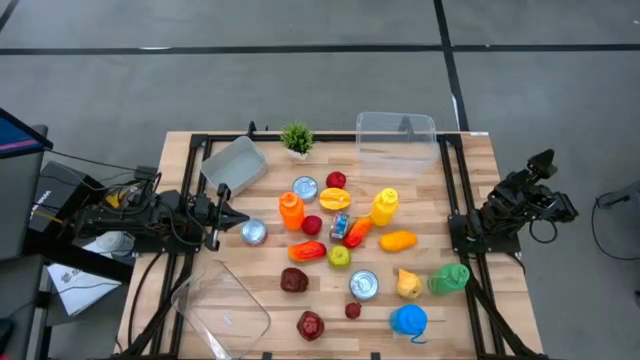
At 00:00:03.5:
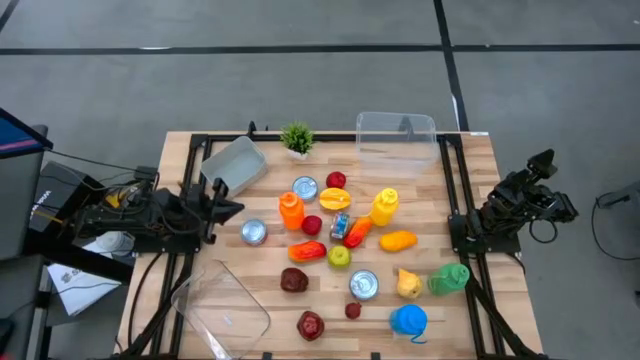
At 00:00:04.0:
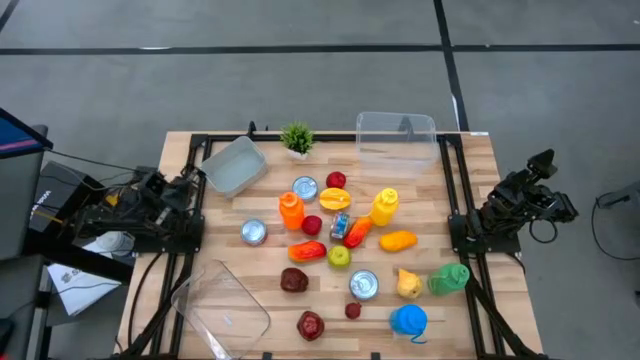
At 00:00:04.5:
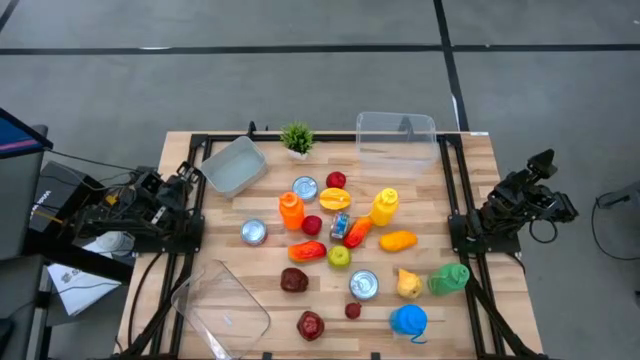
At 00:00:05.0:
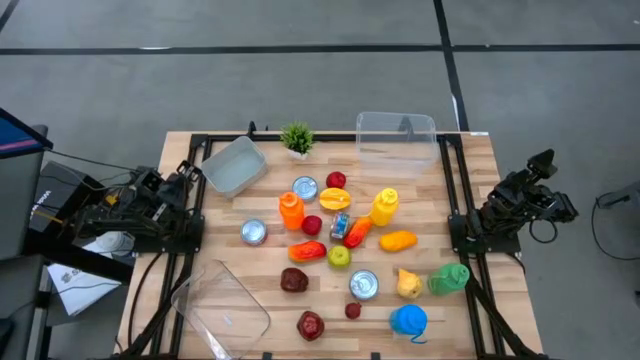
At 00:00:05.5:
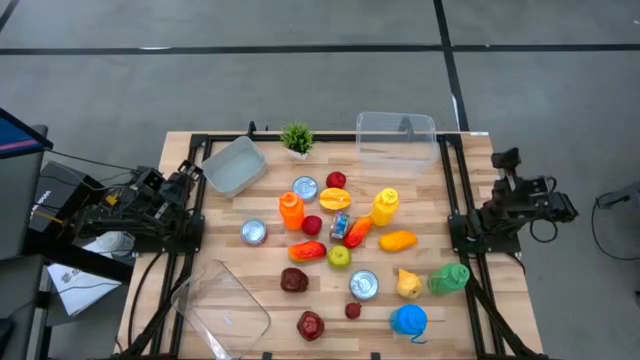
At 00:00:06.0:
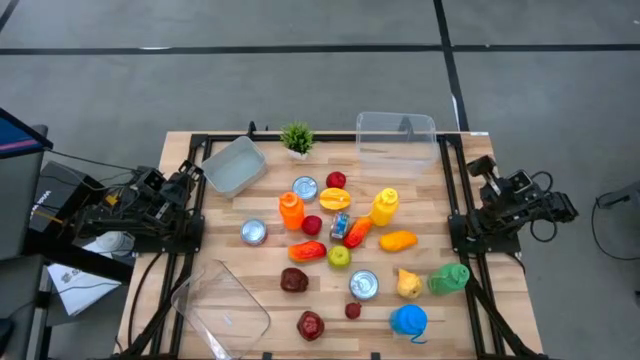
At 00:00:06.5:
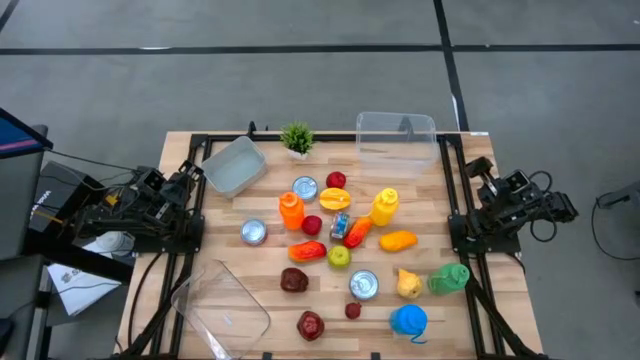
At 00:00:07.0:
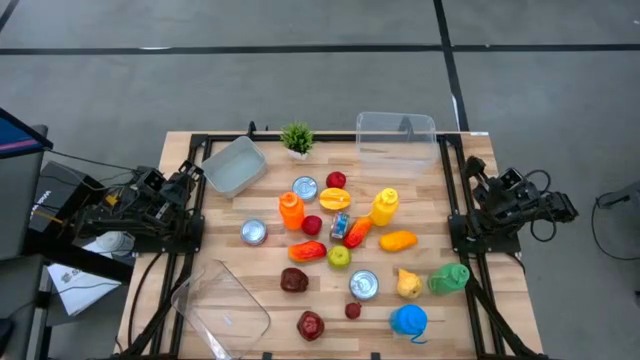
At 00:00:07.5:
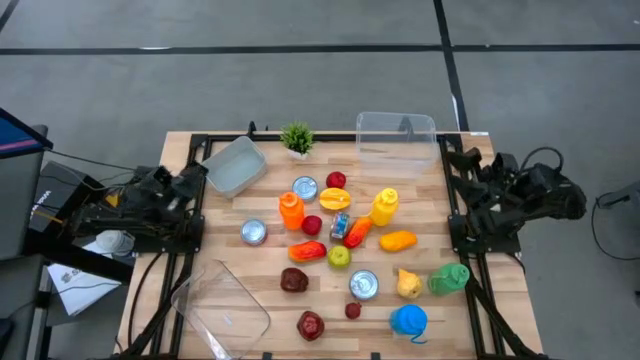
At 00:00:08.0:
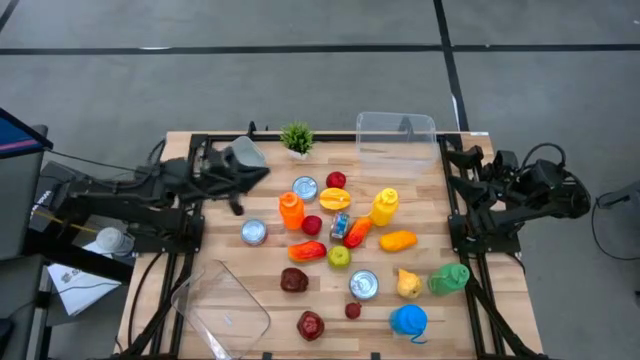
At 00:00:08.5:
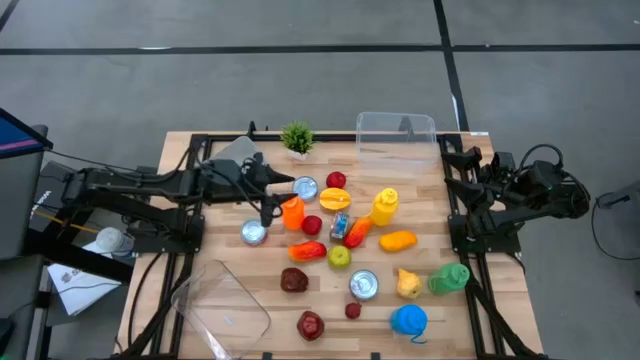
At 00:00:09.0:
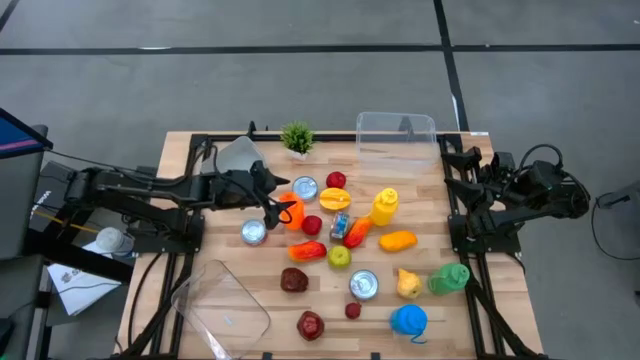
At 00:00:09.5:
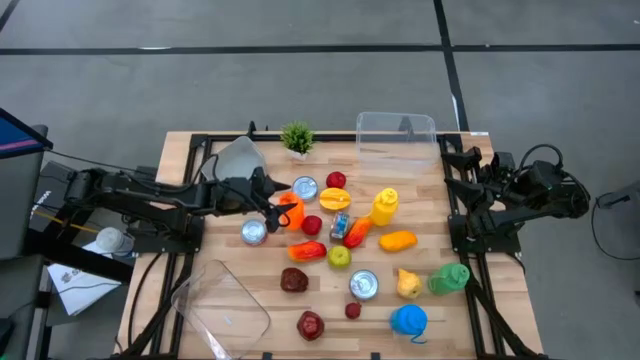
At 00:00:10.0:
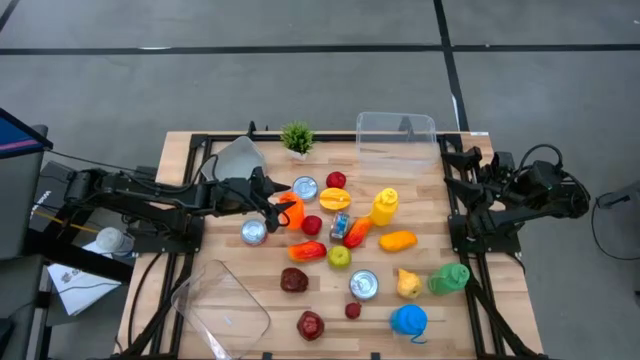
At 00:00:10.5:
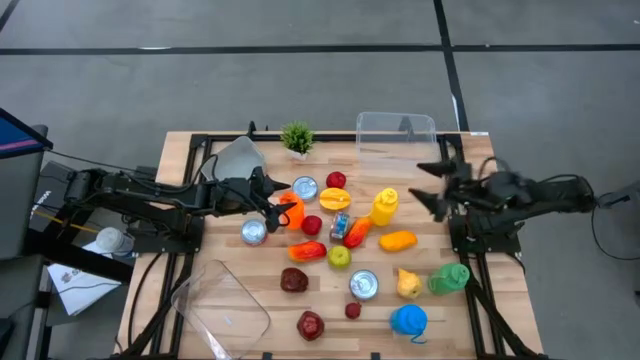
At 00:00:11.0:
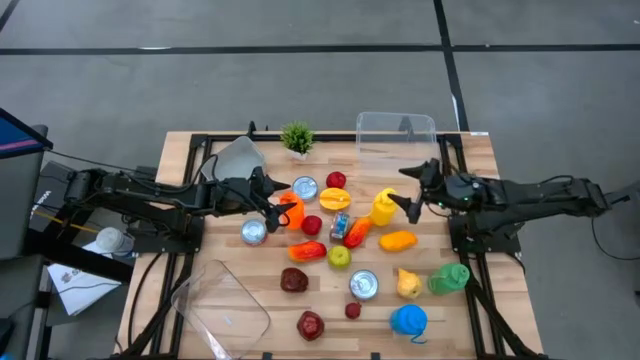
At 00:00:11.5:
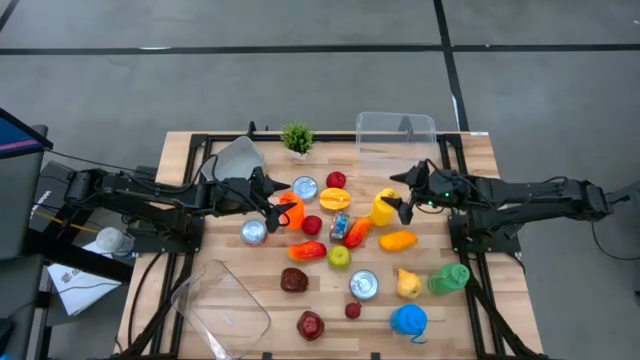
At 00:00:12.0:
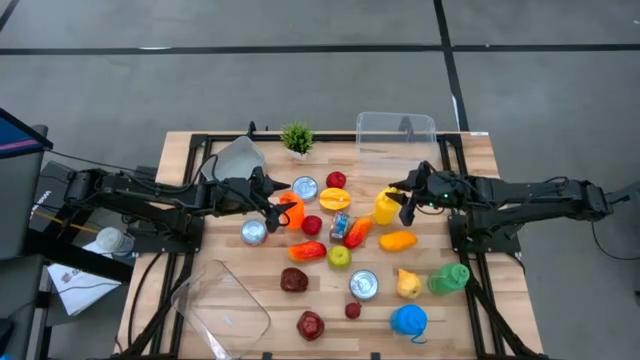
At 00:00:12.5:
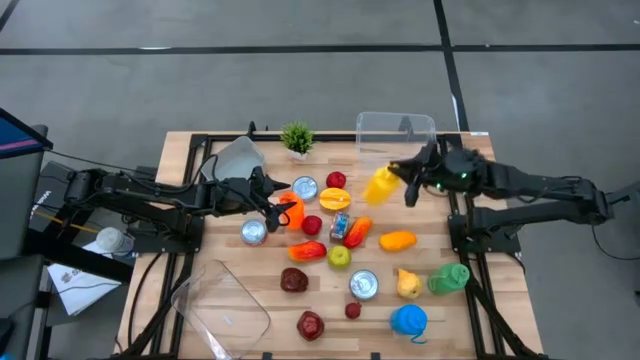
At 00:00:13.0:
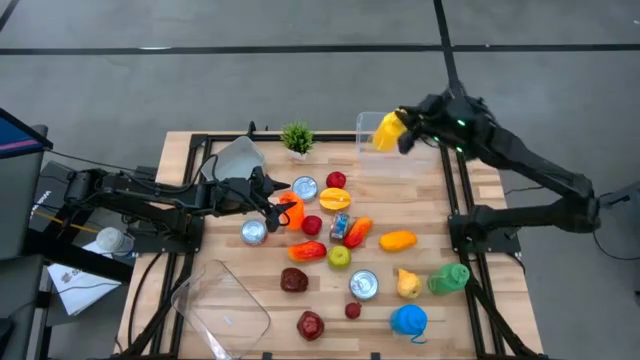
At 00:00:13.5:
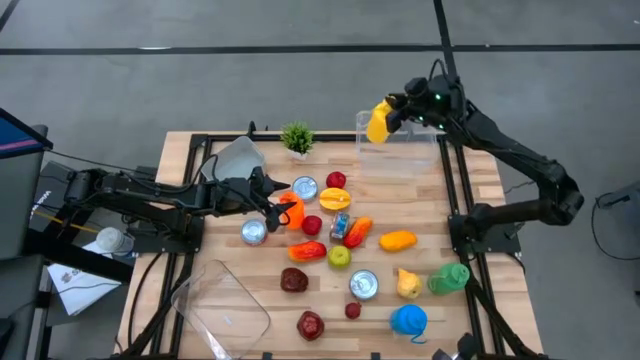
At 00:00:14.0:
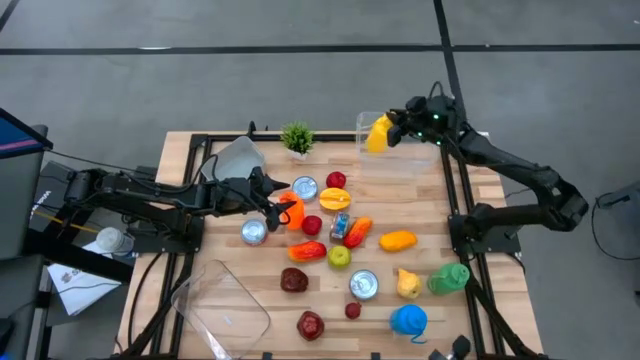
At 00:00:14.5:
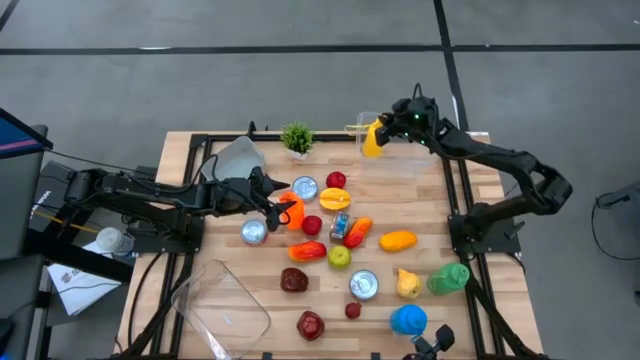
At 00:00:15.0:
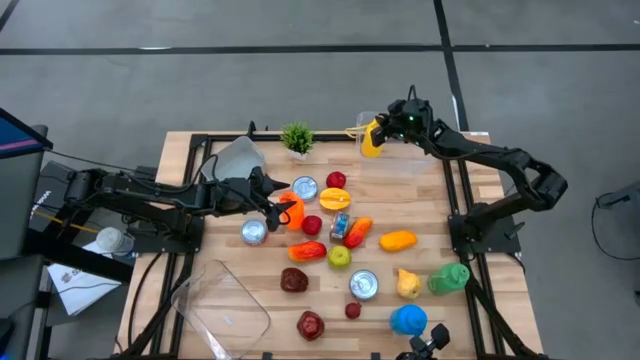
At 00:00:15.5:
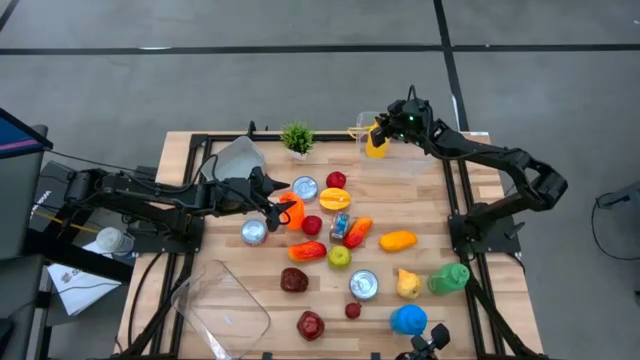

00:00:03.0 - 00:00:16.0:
Task: Pick & Place Food Item
Put the yellow tumbler into the top transparent bin

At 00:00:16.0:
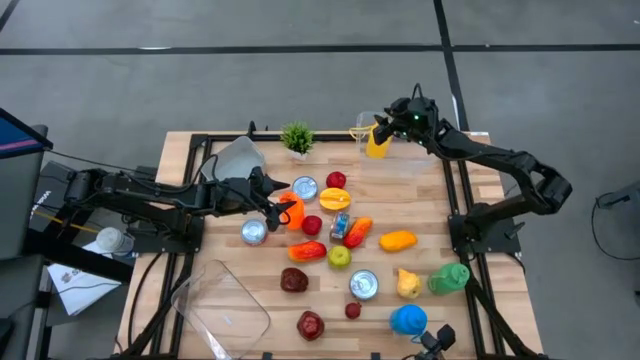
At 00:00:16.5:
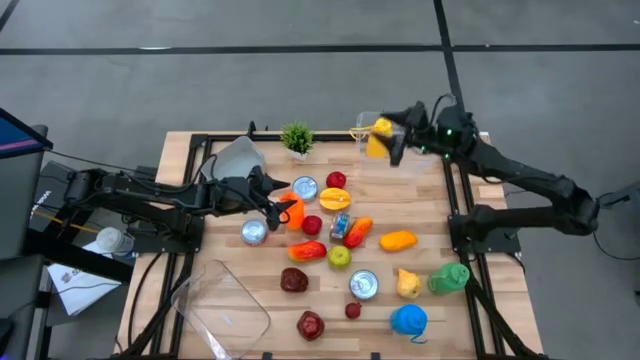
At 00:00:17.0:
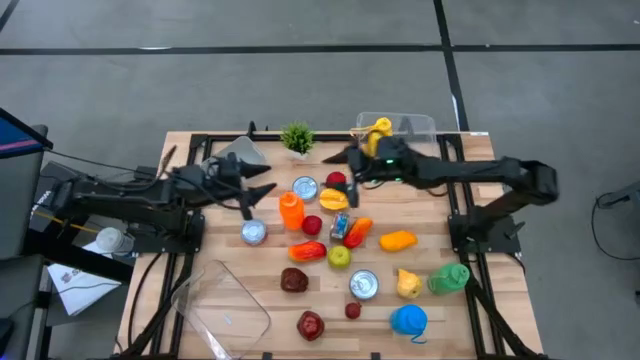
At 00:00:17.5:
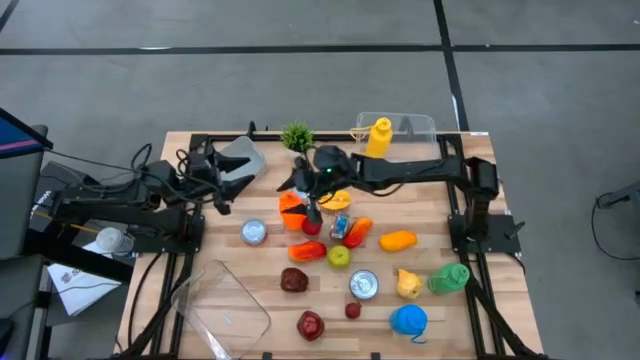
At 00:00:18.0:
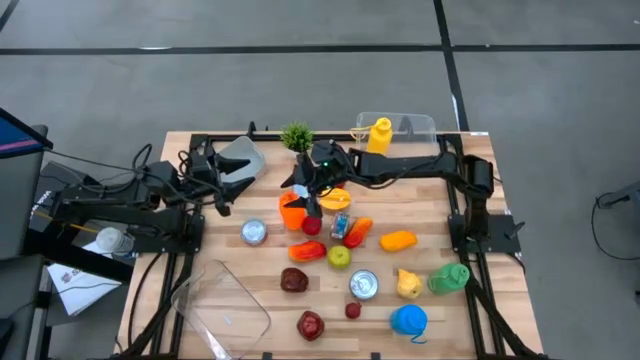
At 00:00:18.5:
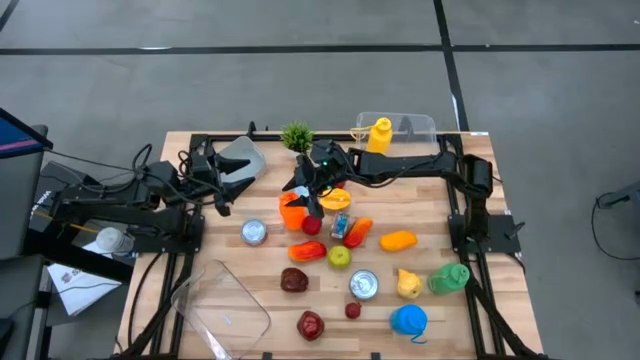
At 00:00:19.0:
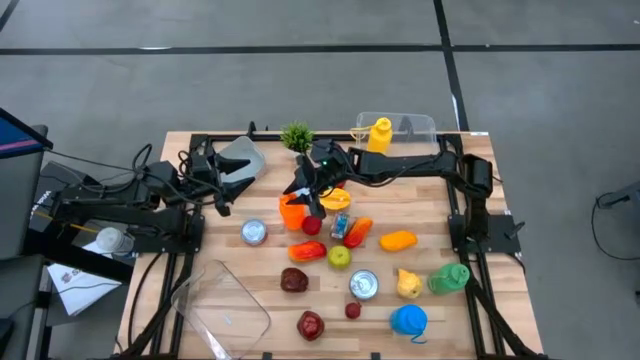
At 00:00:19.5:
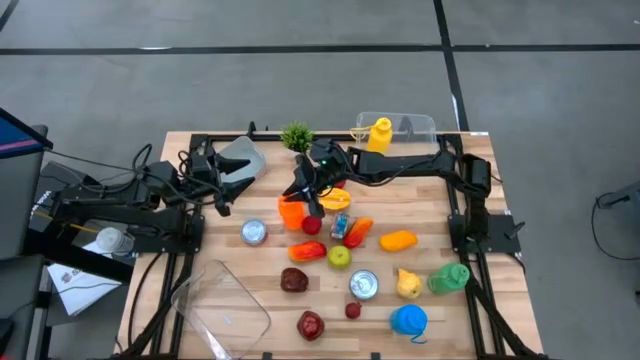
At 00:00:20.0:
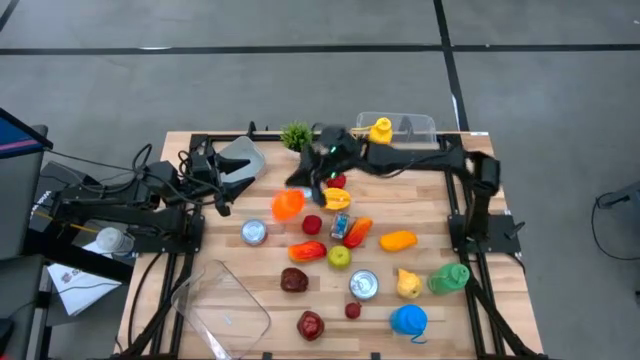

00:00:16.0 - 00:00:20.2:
Put the orange tumbler into the top transparent bin
